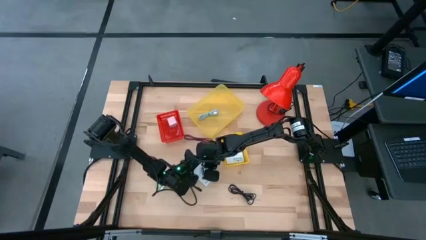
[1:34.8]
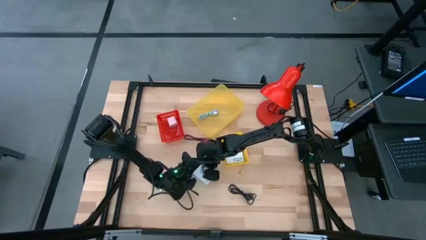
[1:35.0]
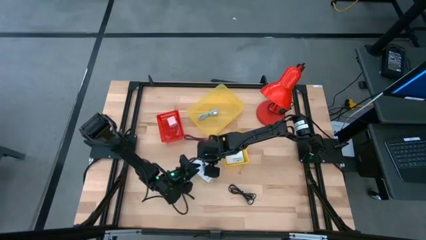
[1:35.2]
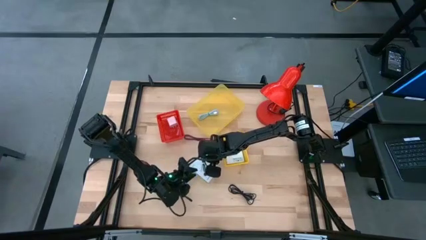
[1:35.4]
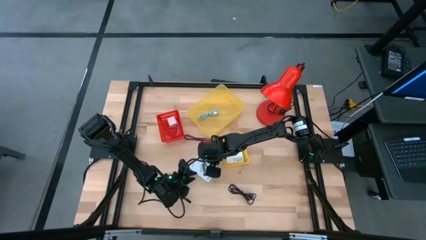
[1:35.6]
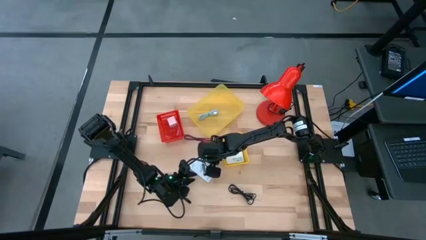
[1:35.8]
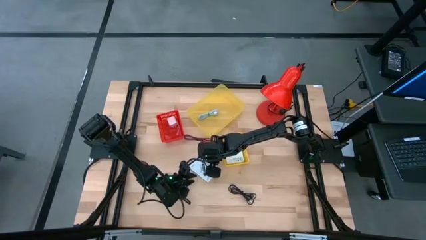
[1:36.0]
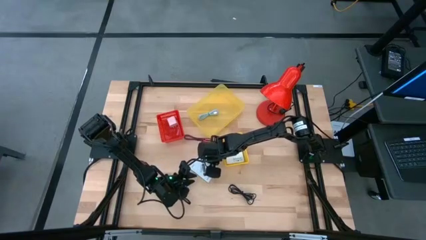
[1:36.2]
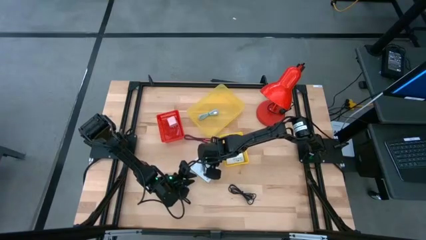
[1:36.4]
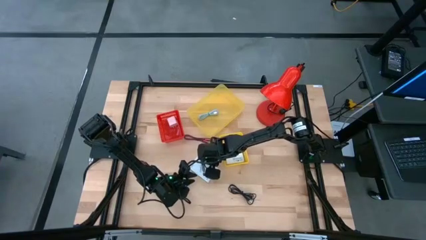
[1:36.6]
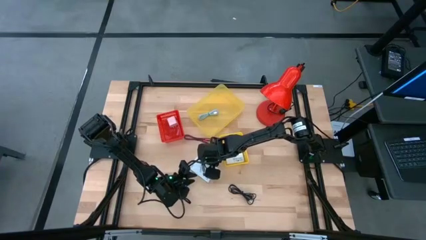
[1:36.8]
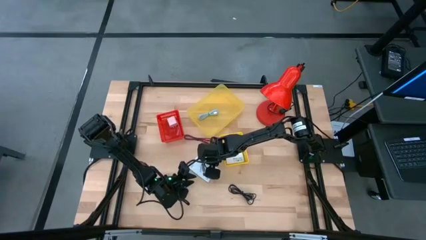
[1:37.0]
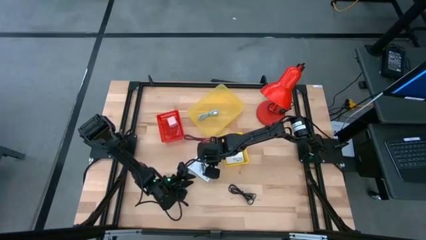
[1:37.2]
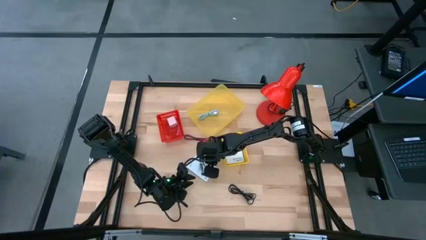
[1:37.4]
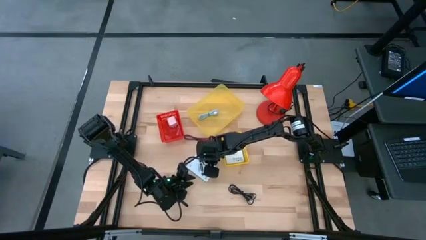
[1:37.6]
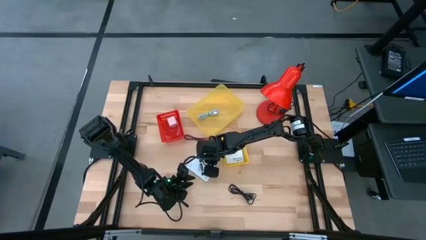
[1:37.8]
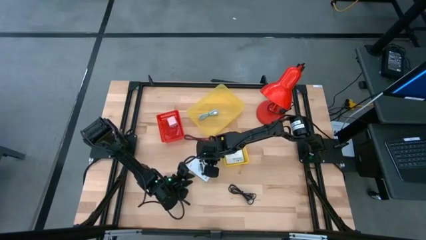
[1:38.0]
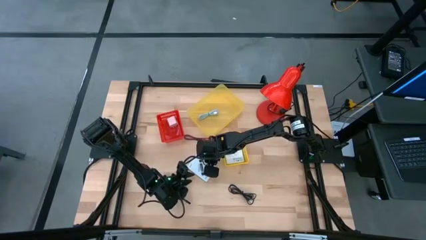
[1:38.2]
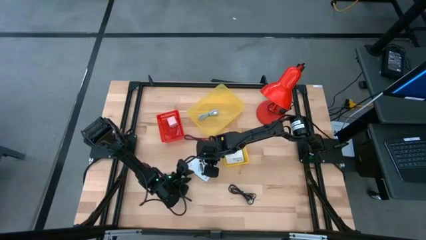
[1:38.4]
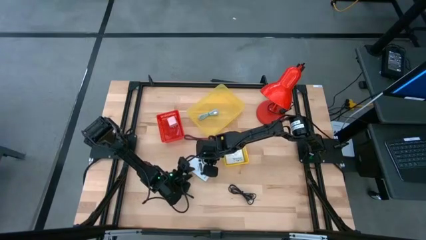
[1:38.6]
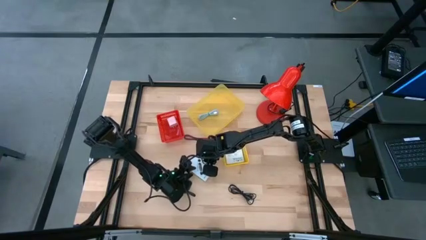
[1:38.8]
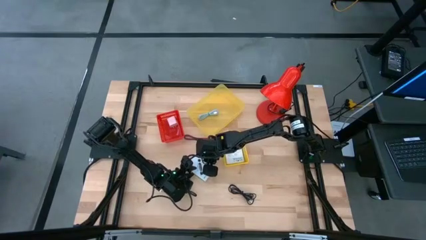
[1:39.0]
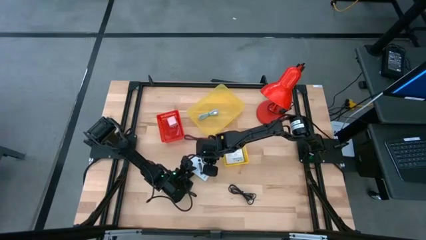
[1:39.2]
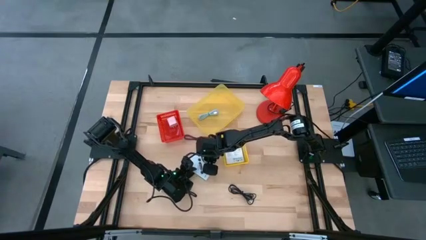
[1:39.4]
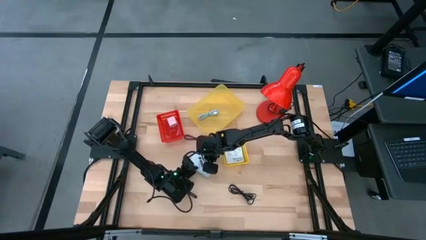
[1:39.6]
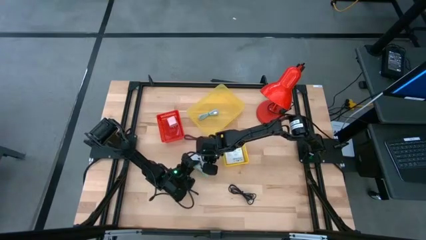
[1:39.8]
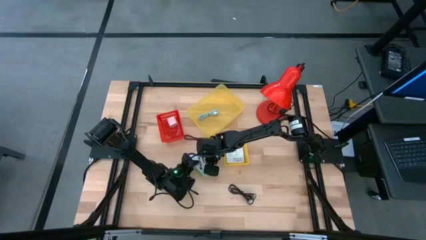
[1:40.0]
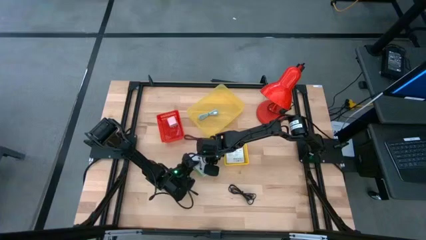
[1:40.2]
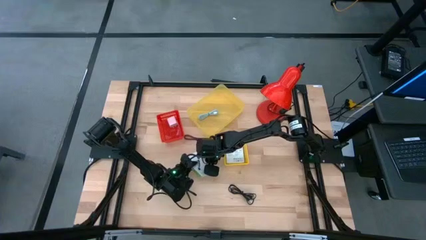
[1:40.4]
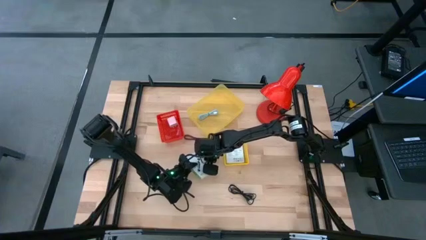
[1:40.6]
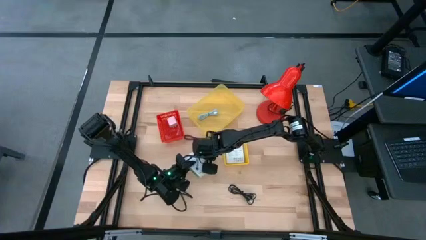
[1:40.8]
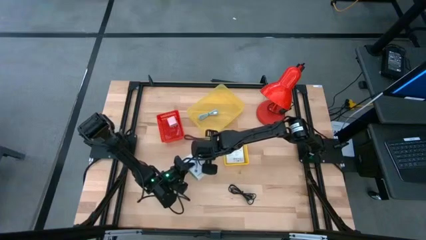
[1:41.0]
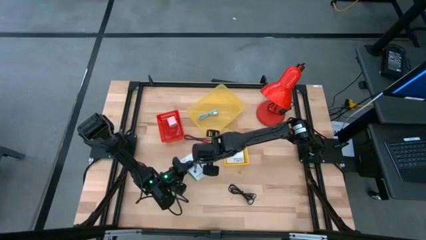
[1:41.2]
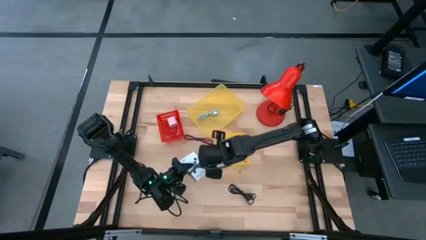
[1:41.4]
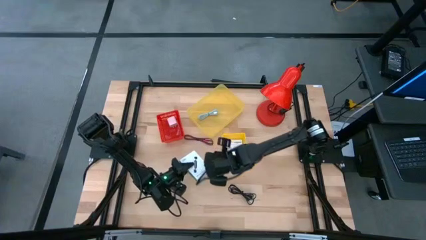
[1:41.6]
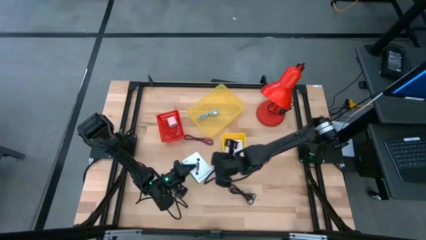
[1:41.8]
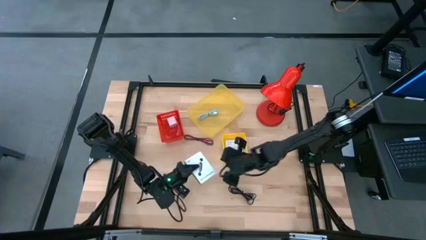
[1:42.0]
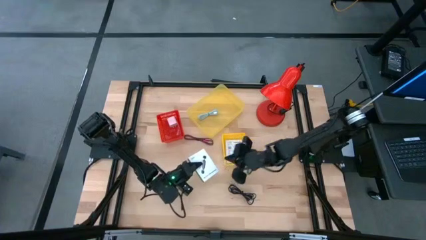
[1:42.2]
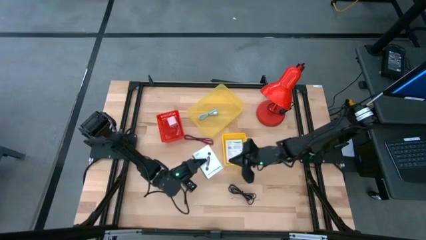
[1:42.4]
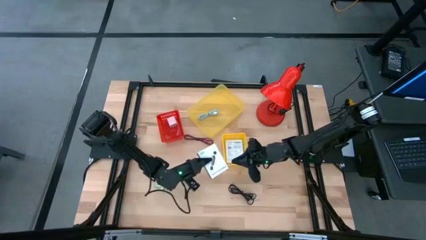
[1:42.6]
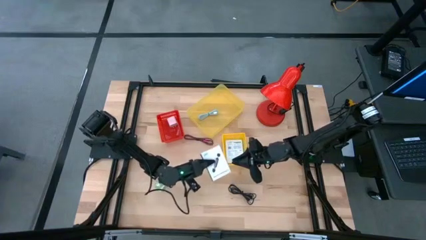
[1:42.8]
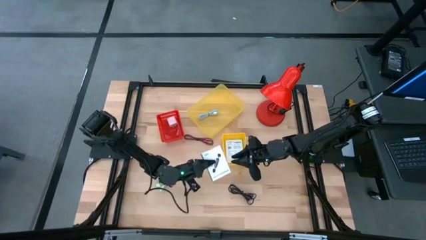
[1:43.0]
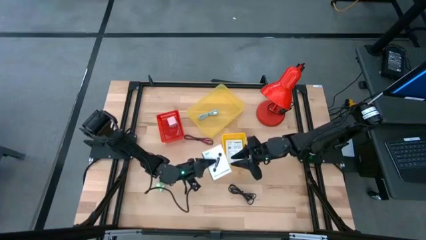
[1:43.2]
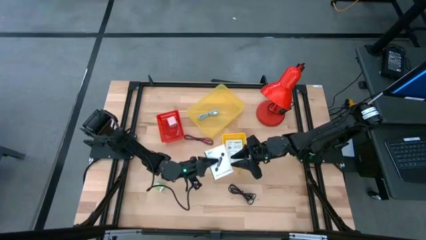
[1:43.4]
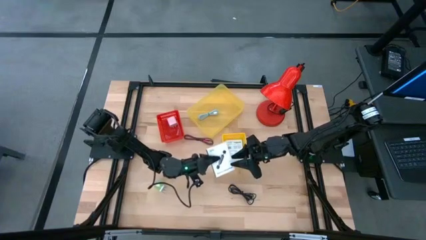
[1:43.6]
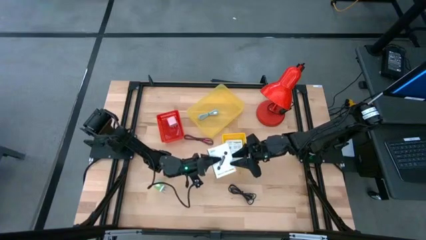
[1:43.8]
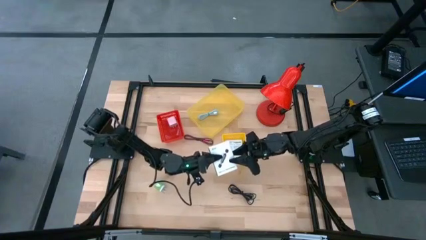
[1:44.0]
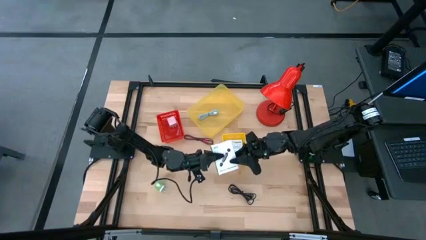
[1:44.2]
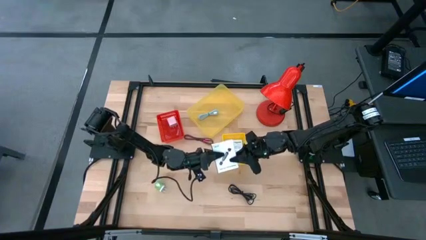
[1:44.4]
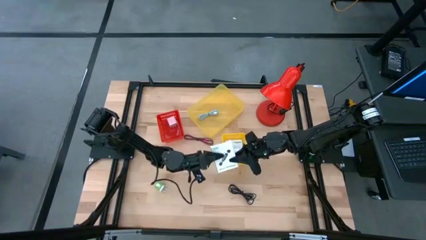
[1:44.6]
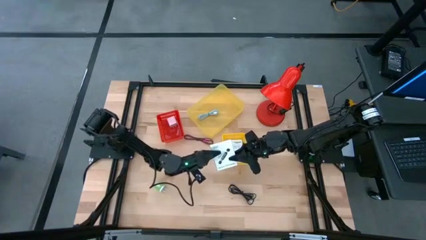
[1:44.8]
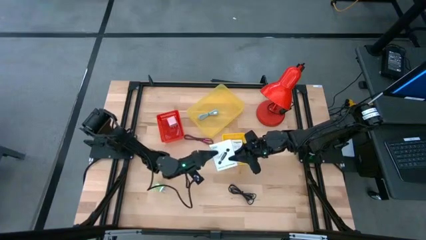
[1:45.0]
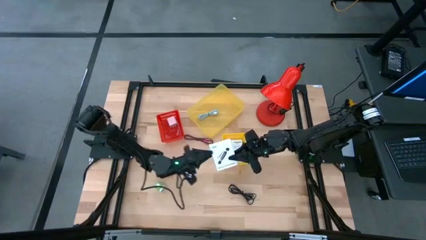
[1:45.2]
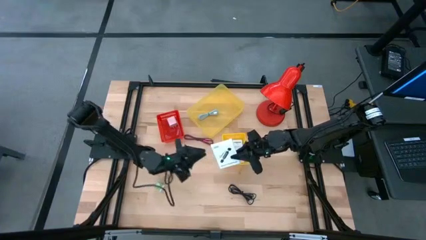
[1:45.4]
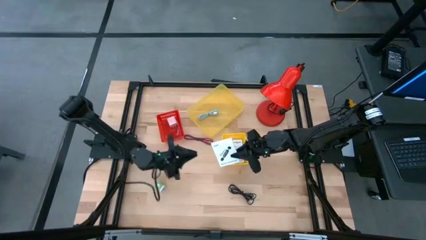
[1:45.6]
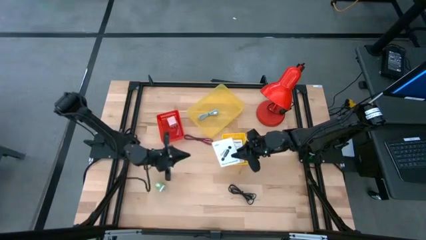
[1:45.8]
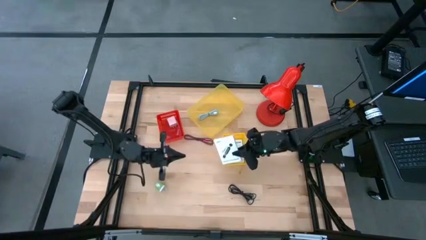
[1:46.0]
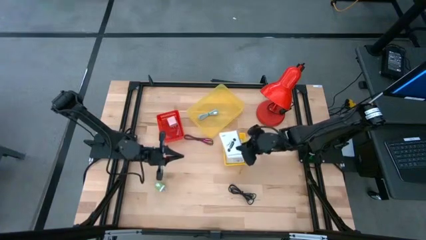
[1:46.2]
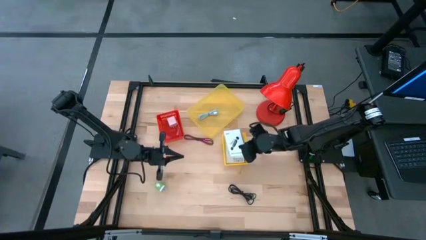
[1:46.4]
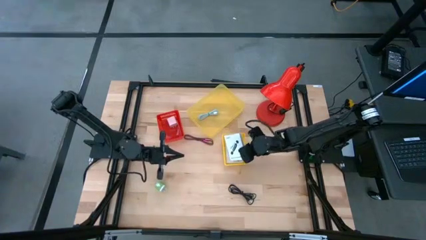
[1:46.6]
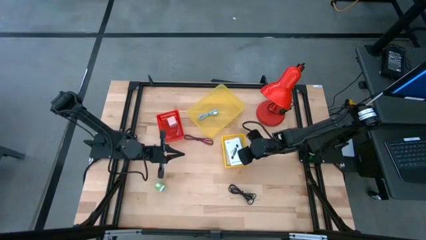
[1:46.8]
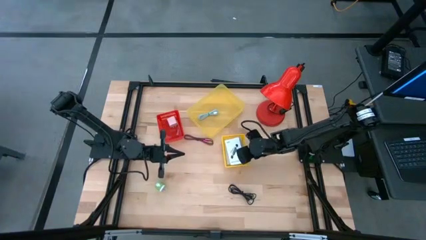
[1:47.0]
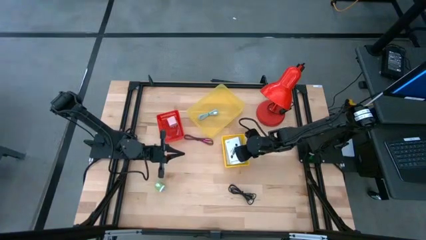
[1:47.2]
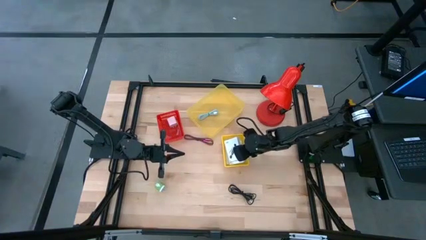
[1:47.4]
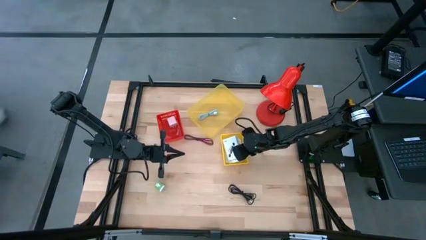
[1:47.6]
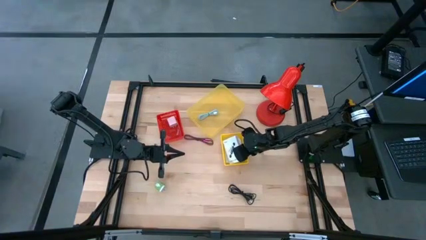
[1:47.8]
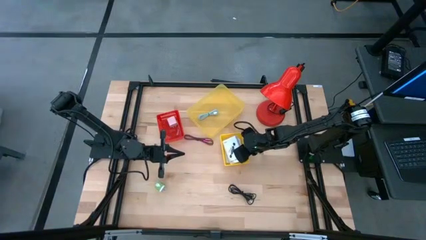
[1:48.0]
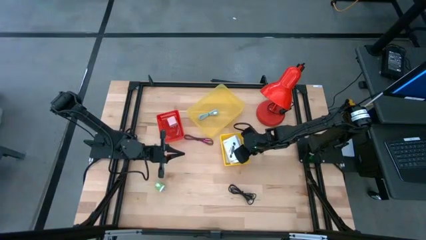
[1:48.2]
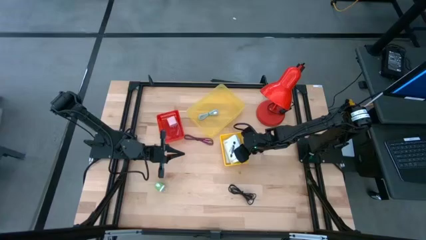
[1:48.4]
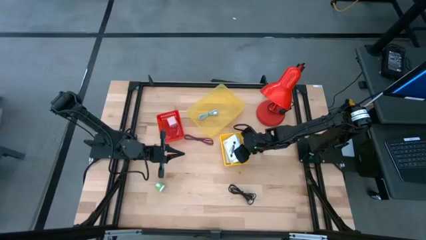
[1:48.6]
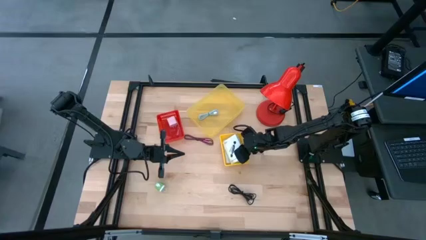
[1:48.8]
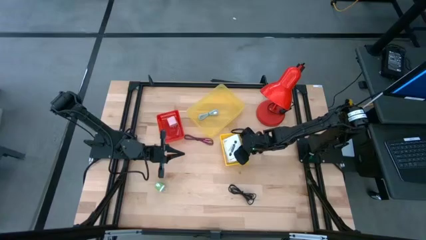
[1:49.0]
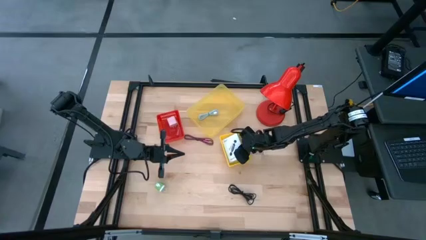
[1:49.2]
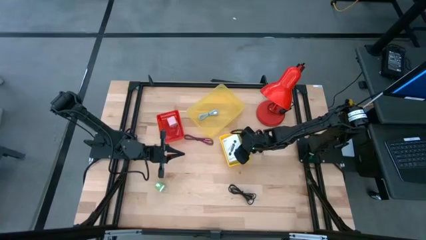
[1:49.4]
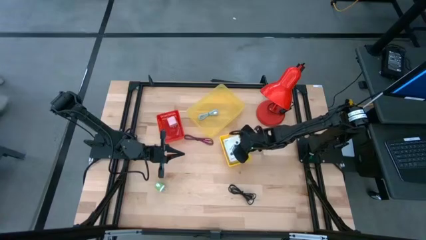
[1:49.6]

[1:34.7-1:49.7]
Task: Pick and place items into bin
Stack the white box on top of the white box
